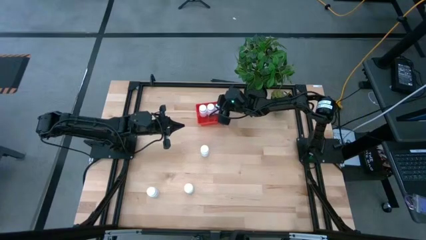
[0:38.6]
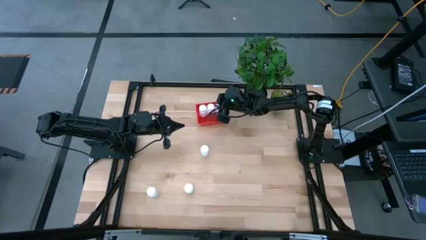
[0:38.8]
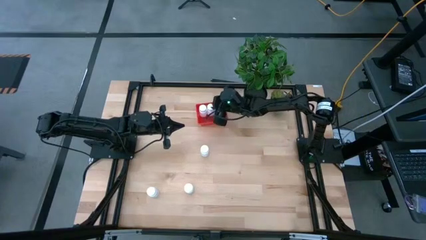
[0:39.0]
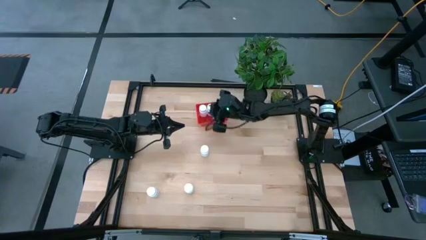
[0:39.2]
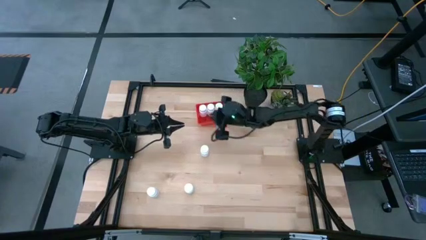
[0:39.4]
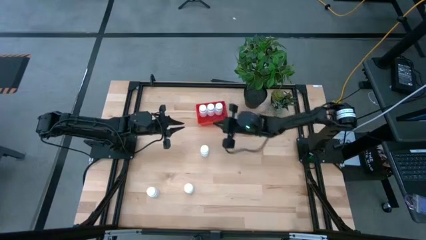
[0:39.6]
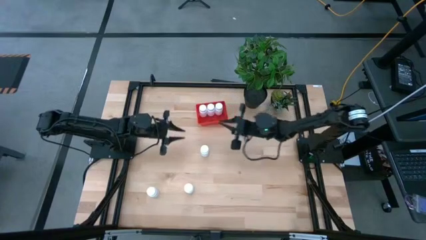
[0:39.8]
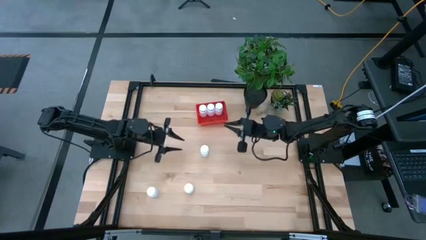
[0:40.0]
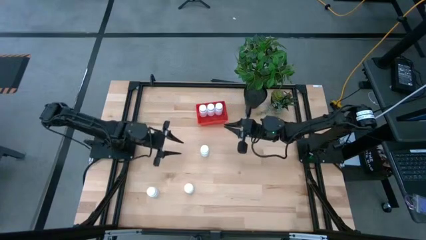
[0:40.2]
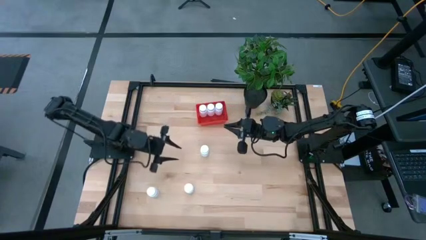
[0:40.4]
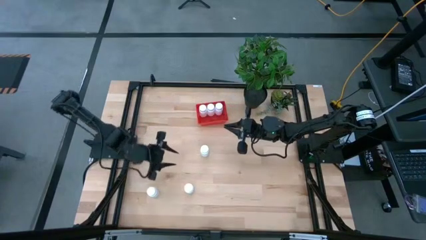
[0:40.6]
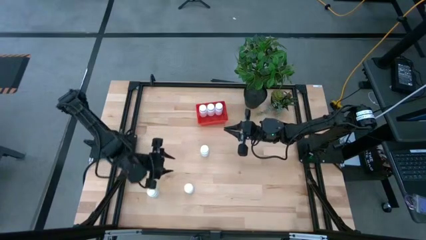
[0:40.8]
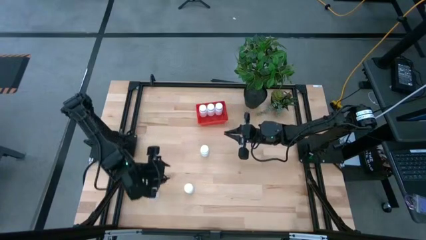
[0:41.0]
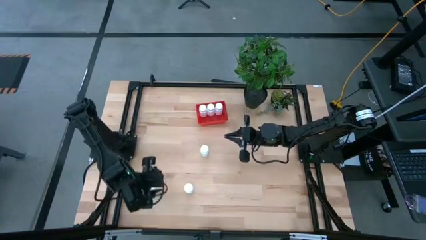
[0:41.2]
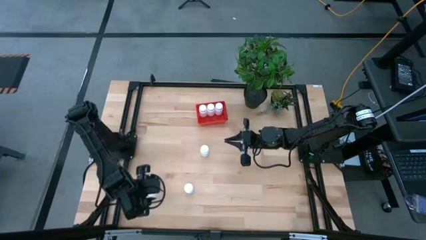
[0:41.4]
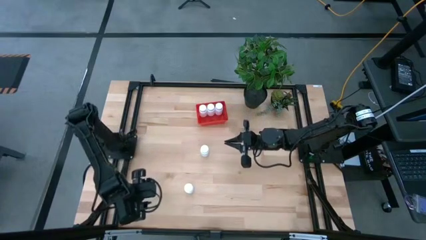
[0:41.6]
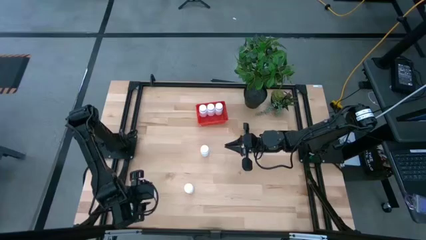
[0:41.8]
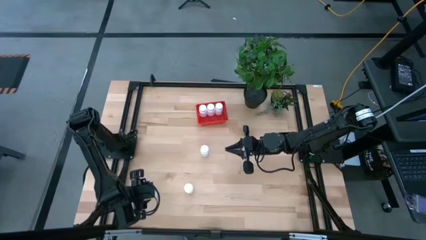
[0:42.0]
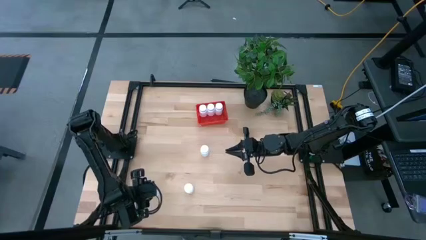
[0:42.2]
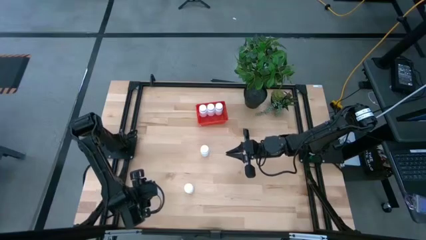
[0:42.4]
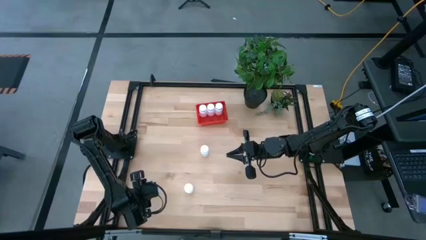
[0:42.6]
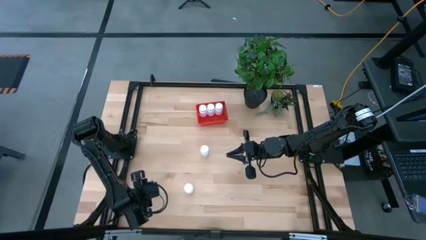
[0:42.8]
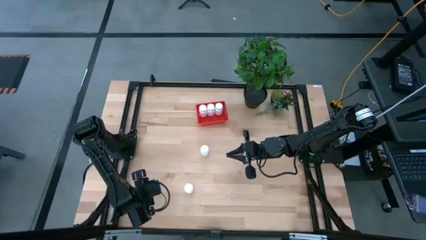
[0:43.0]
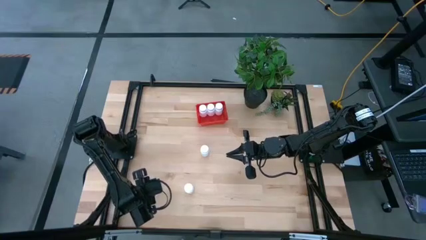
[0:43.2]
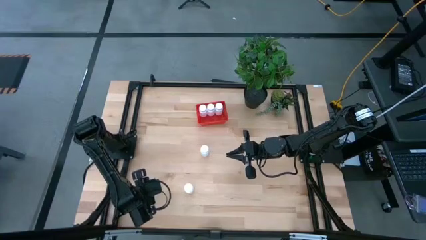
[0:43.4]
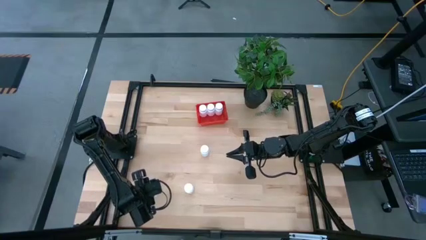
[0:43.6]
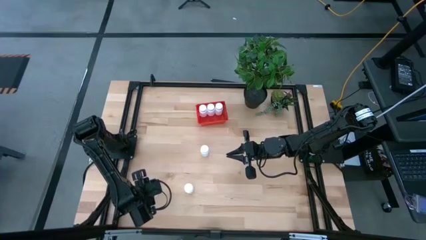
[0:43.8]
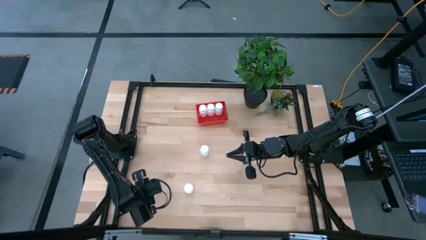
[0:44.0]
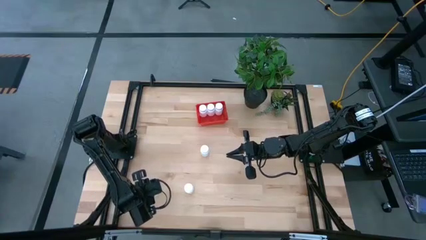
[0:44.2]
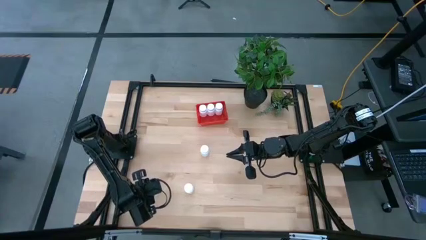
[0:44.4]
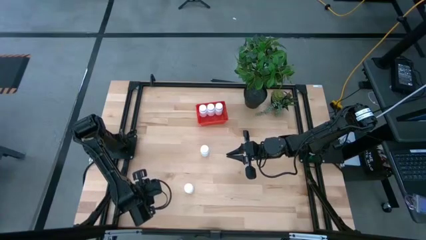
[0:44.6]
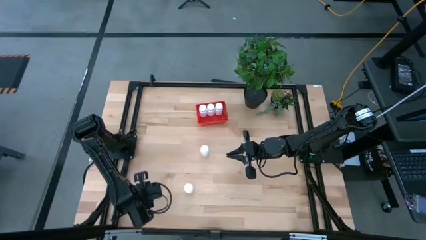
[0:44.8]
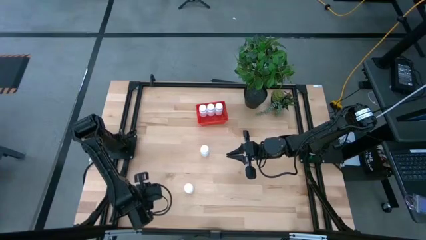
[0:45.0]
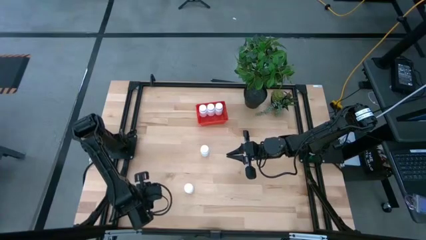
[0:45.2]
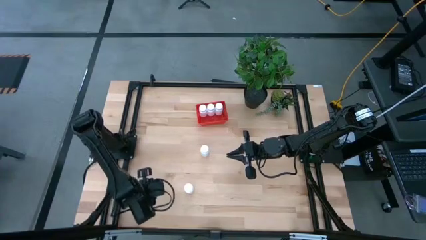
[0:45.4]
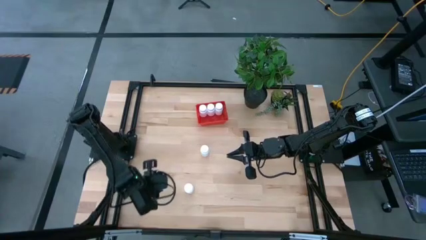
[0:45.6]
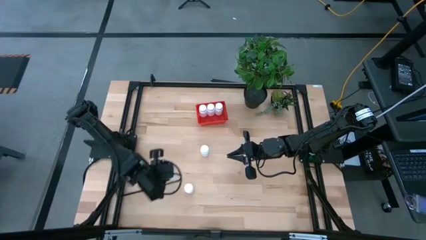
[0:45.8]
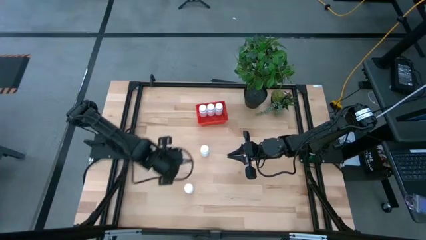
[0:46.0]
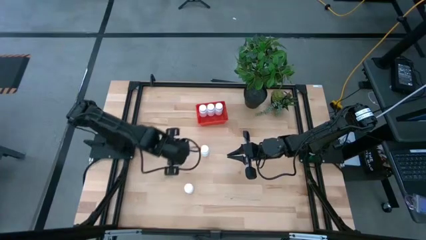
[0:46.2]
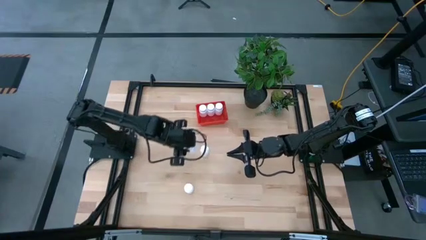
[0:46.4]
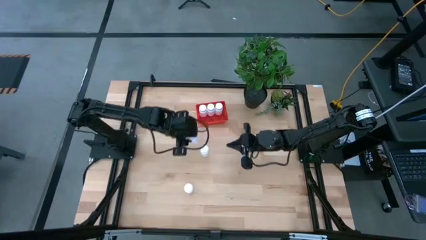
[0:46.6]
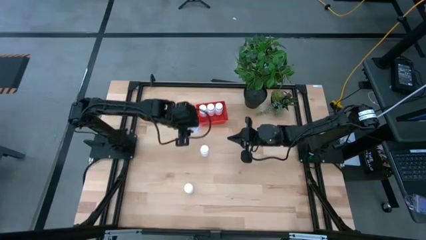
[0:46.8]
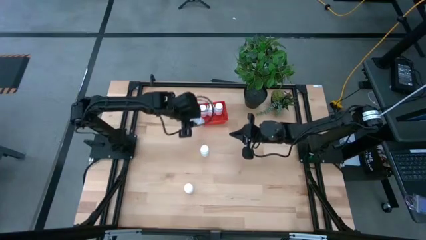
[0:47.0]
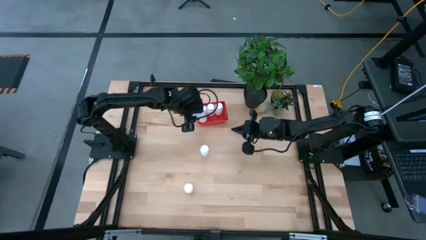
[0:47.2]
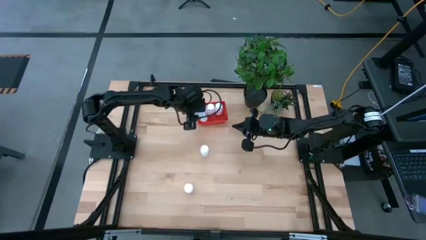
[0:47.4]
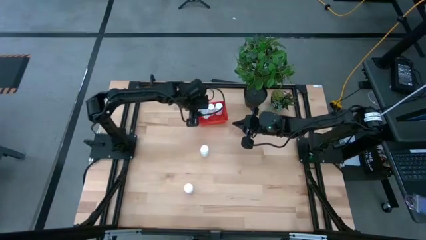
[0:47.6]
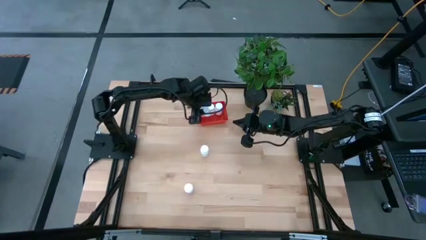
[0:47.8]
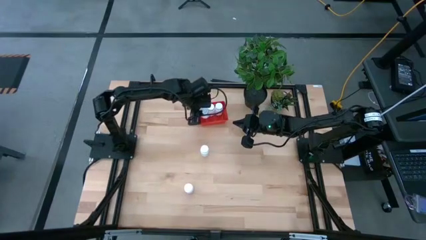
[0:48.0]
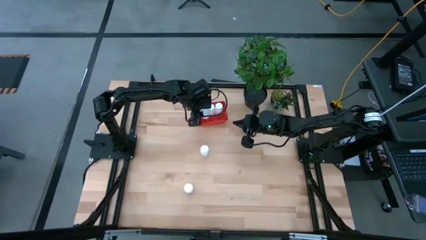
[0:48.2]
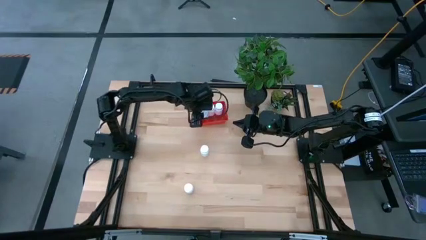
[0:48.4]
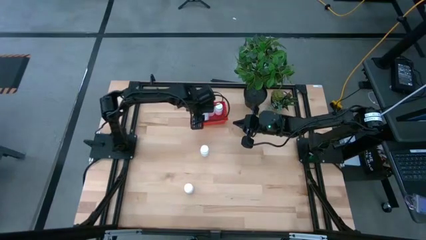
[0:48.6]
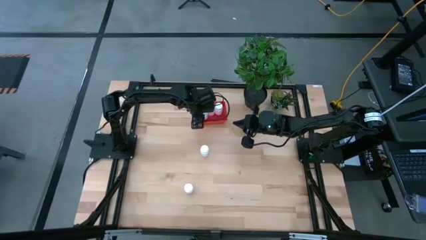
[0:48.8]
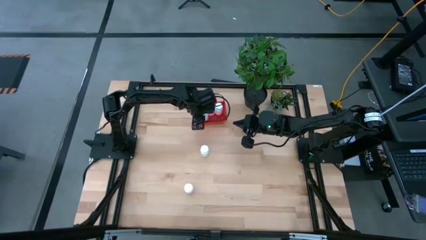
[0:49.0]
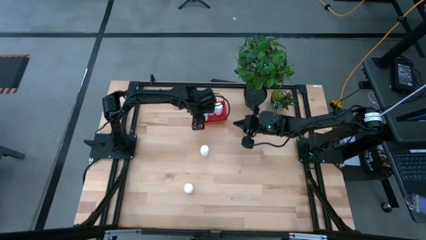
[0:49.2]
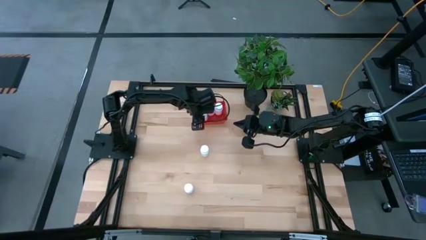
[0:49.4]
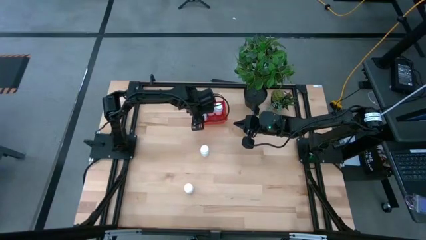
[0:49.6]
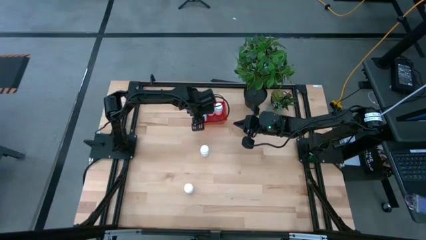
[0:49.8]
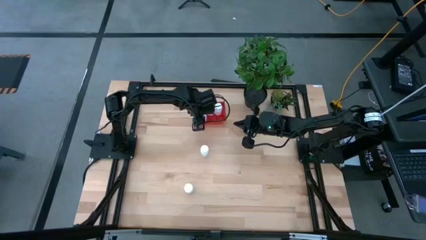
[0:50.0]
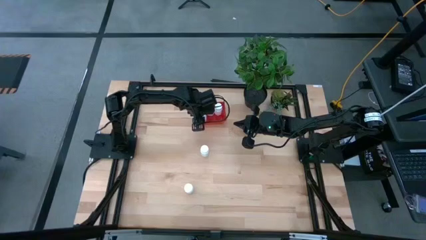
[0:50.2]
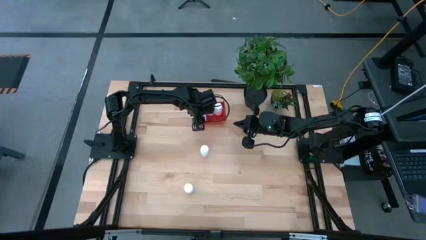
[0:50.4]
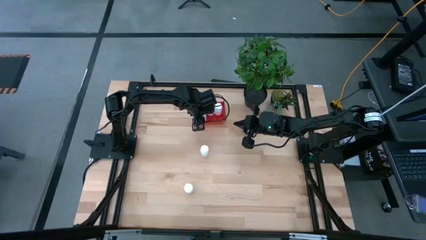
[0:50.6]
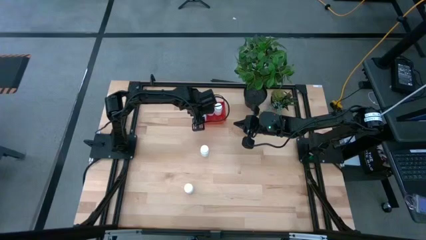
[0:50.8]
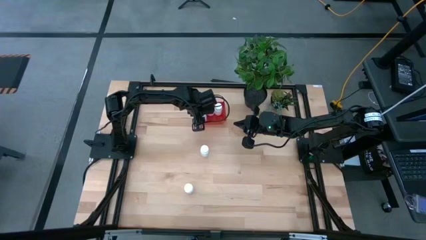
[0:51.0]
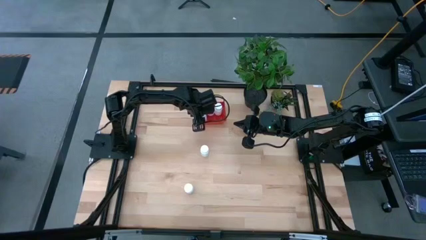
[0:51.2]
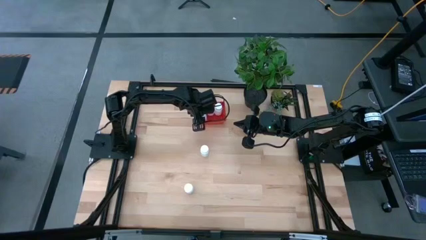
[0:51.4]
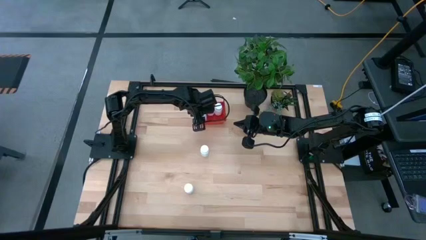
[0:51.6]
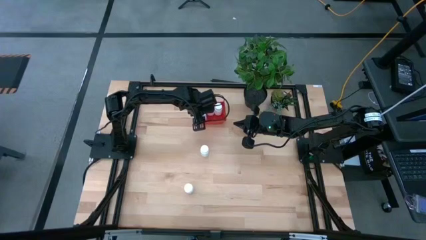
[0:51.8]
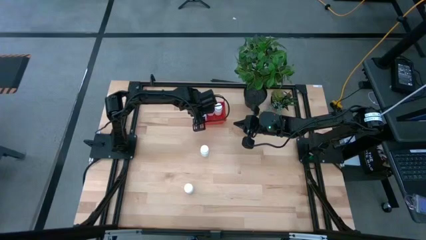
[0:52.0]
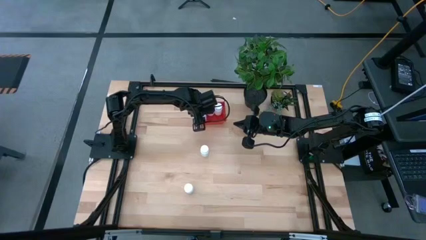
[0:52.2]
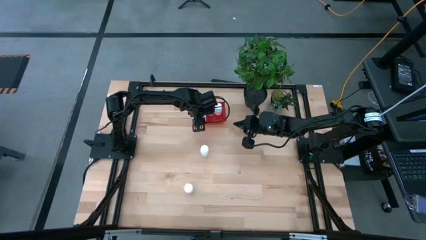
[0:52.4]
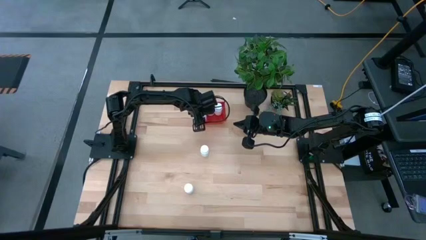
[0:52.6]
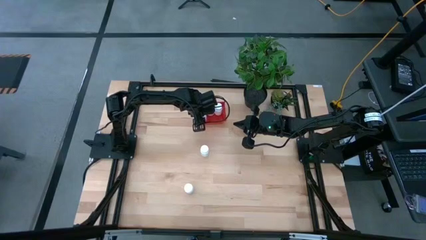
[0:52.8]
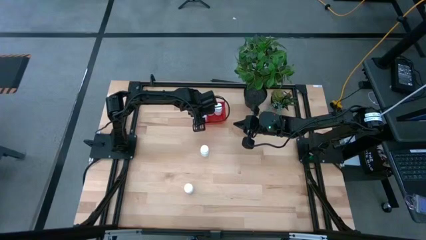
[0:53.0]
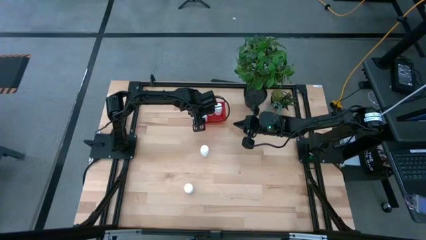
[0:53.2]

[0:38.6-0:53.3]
Task: Pick and place pill bottles into a basket
Put the white pill bottle into the red bin
